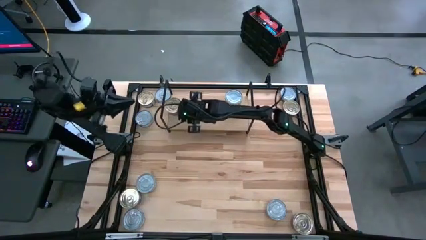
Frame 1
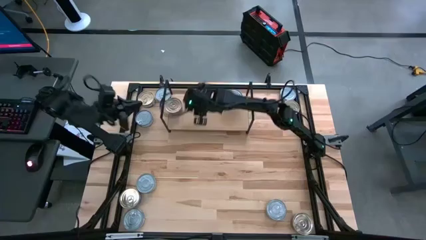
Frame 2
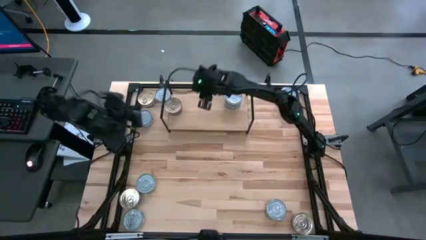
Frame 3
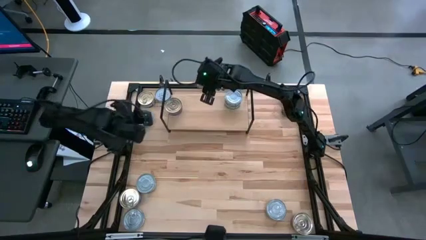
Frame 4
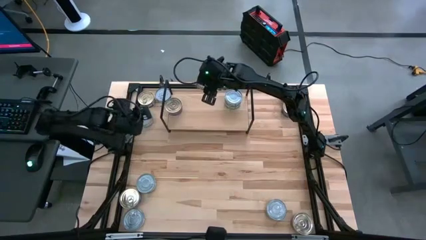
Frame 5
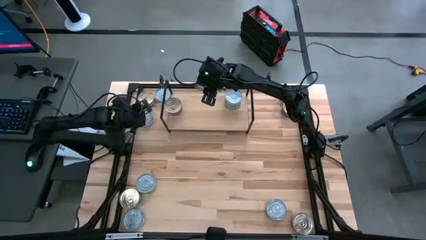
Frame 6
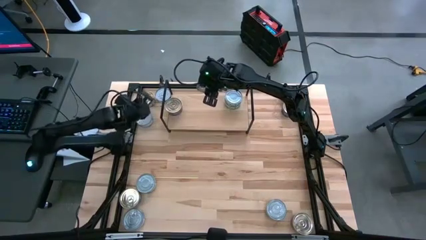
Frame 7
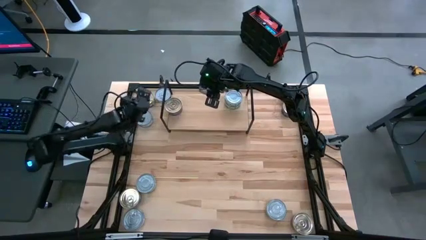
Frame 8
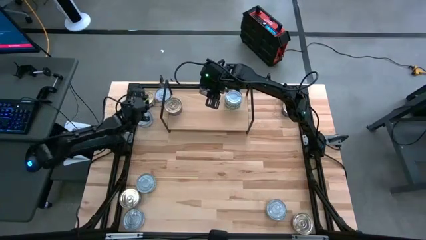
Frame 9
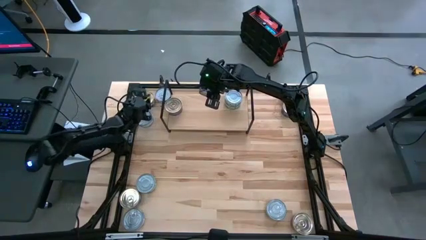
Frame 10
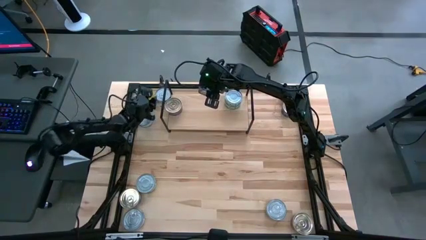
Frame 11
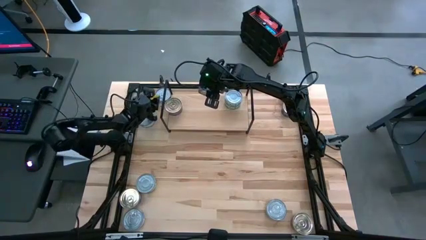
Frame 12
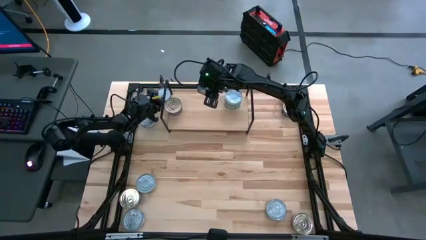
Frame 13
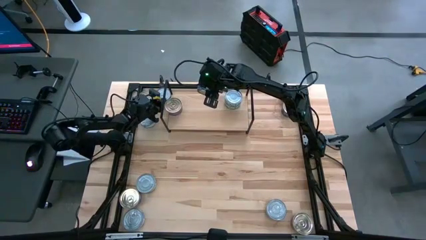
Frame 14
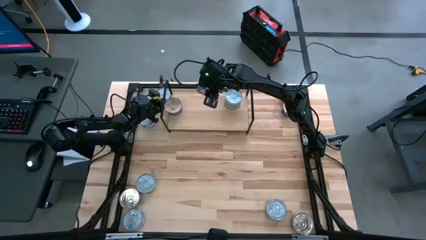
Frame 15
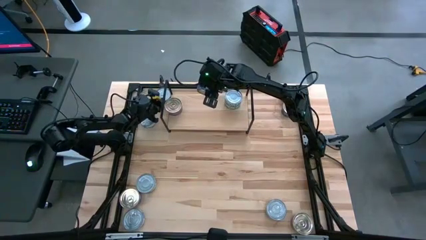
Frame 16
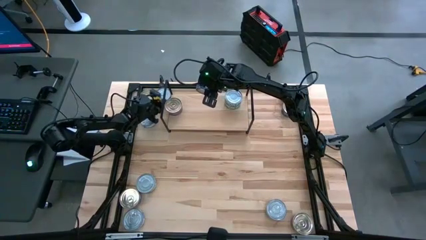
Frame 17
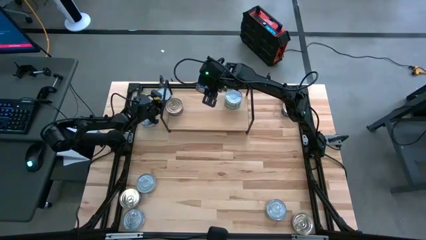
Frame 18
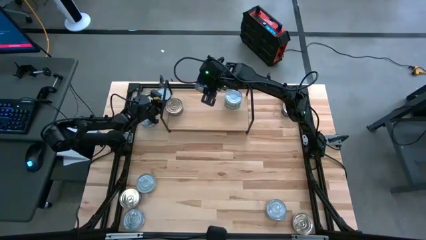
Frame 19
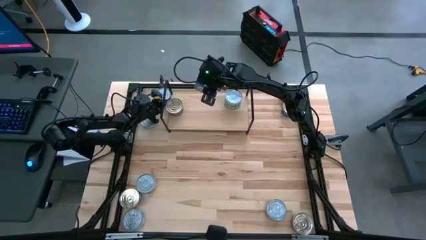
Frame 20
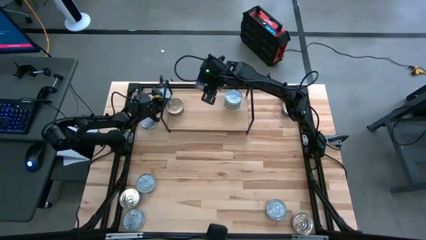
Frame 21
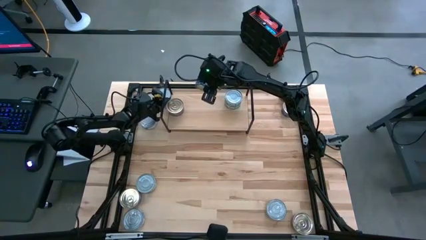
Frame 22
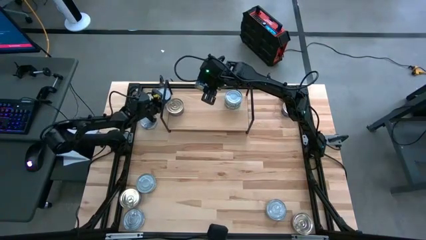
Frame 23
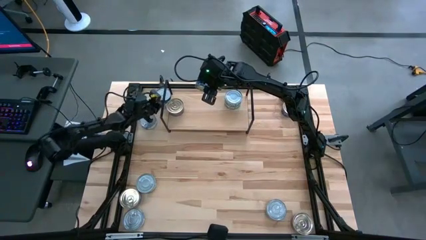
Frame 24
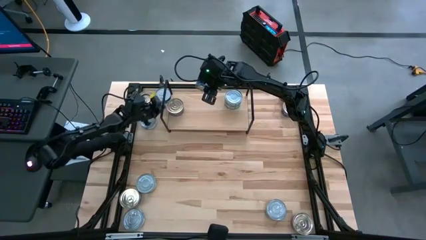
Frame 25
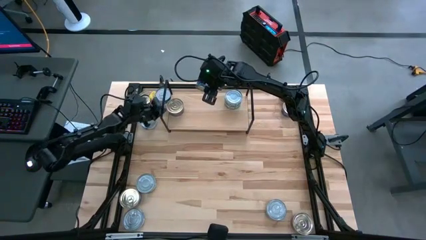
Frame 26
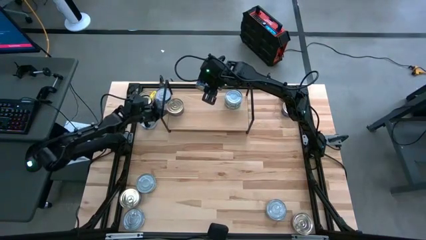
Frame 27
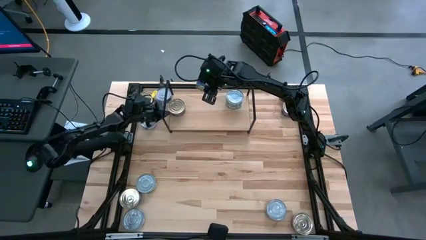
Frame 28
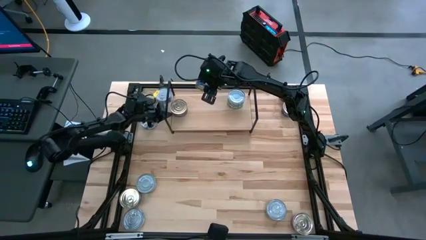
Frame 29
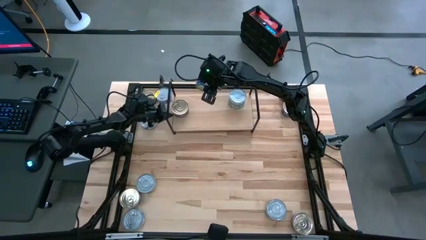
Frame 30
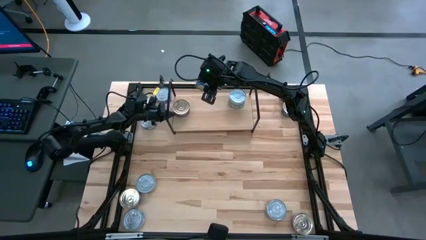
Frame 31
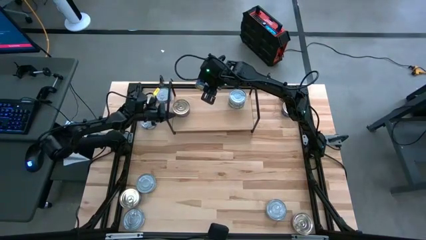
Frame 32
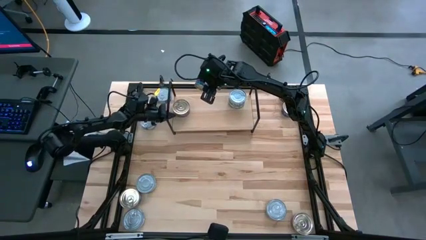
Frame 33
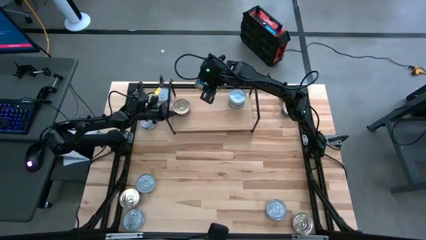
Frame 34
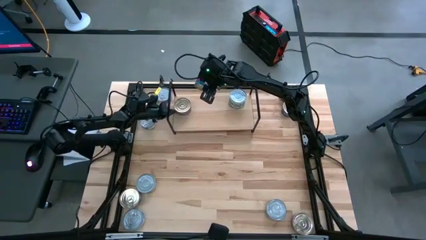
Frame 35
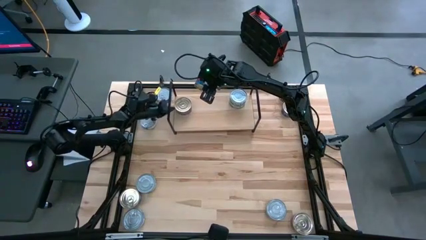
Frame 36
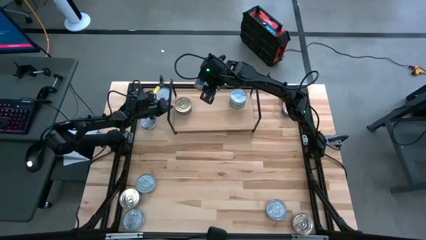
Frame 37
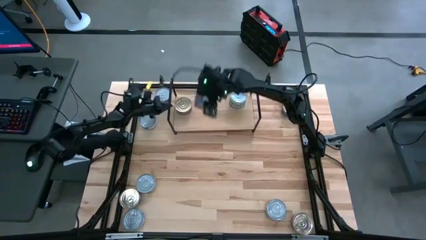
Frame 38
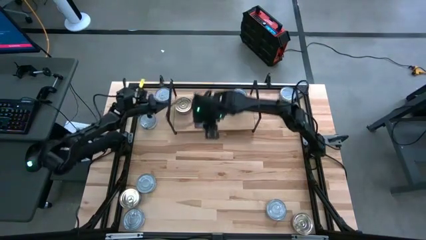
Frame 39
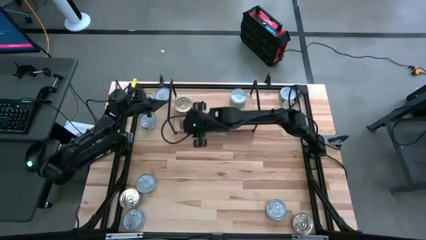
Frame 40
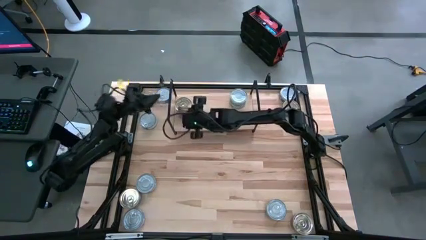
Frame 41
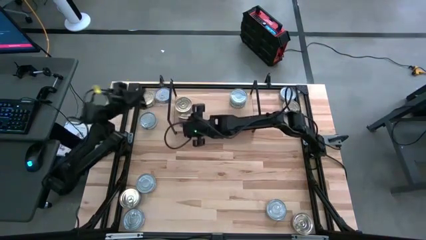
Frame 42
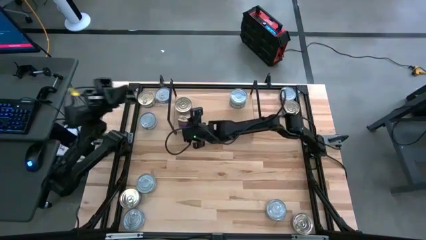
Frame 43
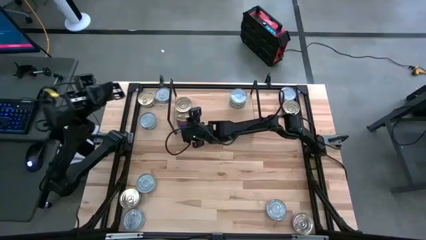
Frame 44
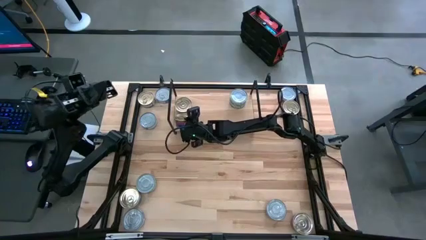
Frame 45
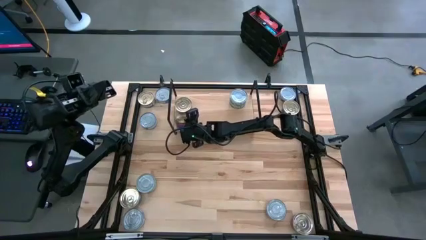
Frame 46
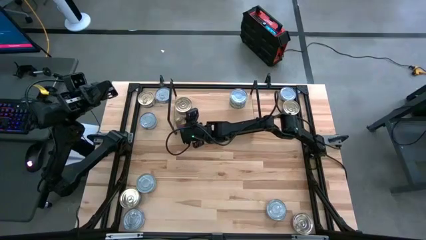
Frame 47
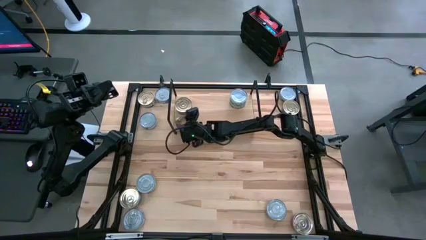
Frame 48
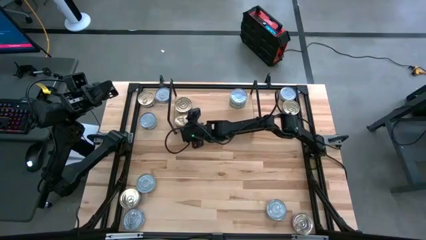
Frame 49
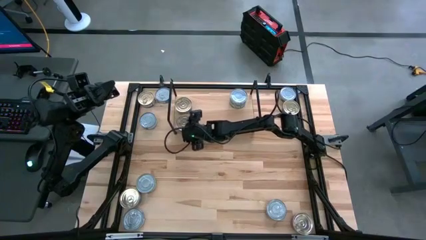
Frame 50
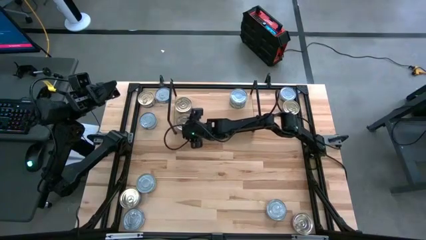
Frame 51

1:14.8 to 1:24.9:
Task: Stack canned seafood by type on shelf
Put the blue and pink can on the shelf
